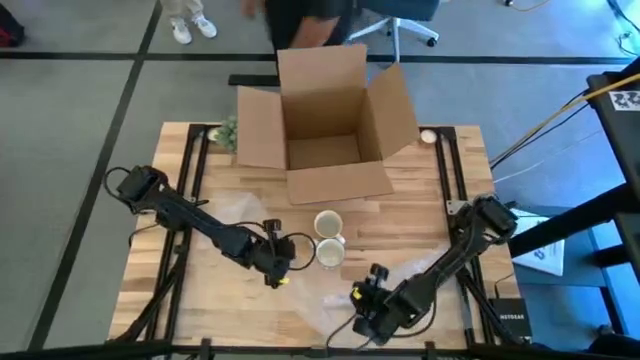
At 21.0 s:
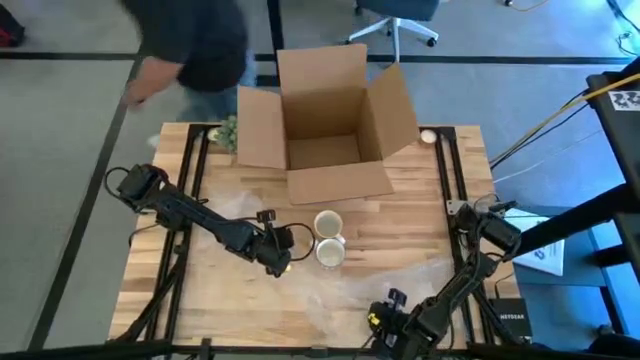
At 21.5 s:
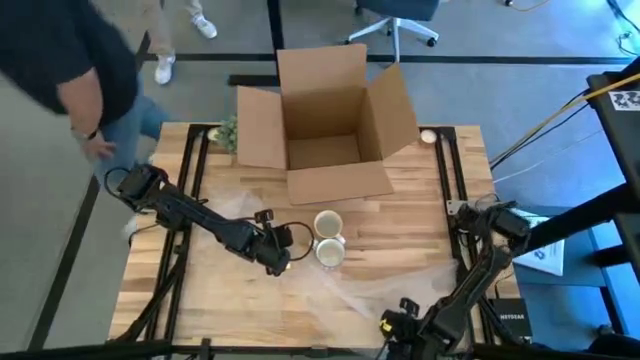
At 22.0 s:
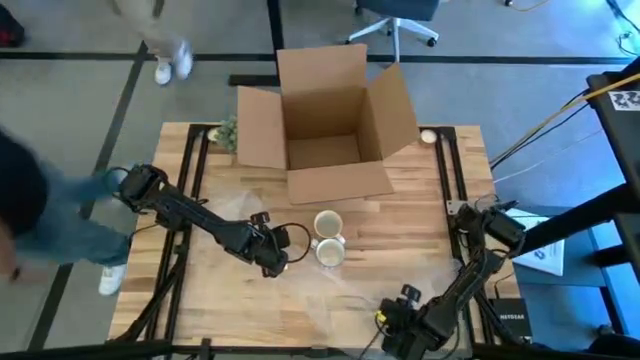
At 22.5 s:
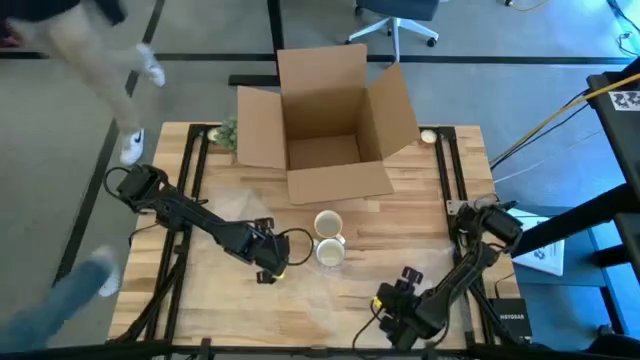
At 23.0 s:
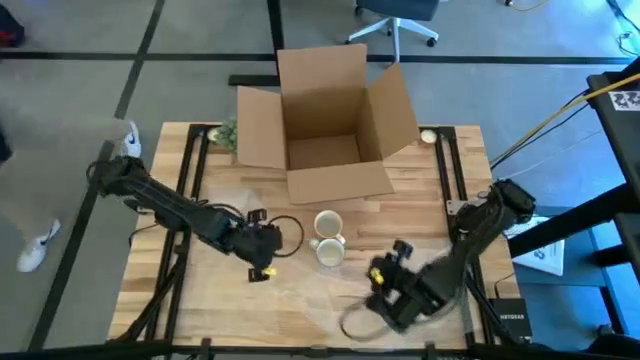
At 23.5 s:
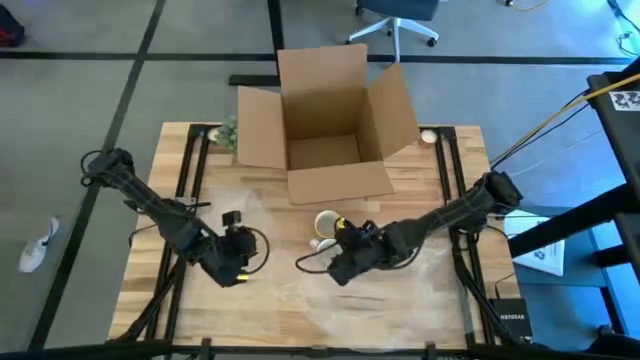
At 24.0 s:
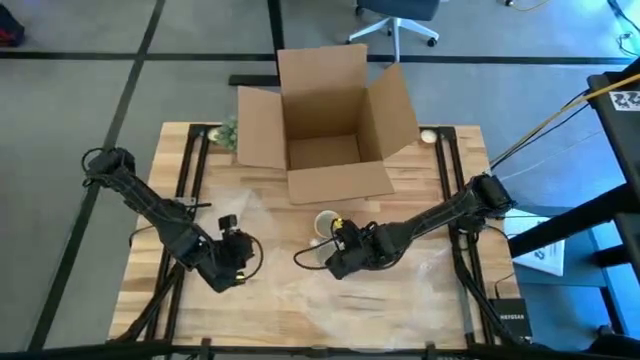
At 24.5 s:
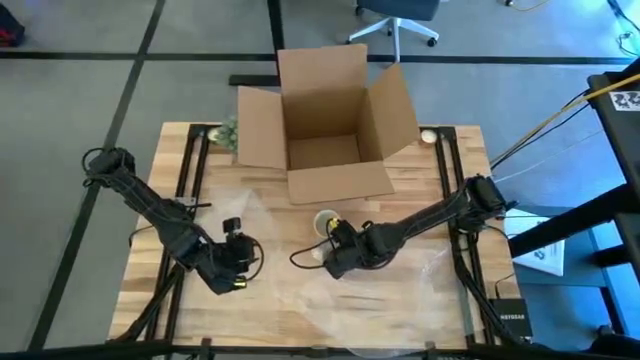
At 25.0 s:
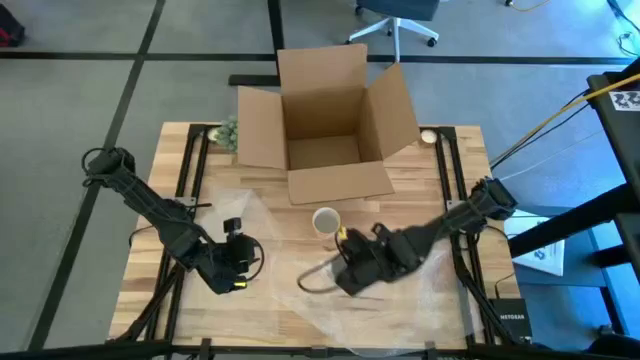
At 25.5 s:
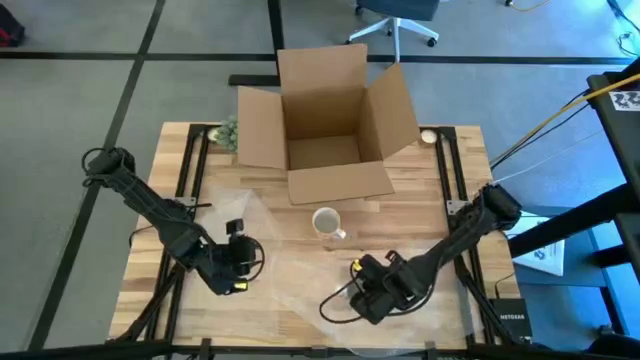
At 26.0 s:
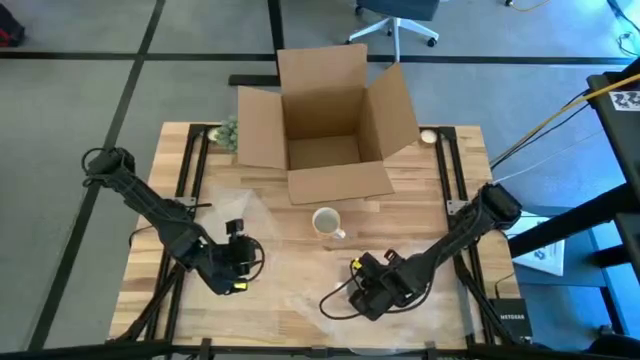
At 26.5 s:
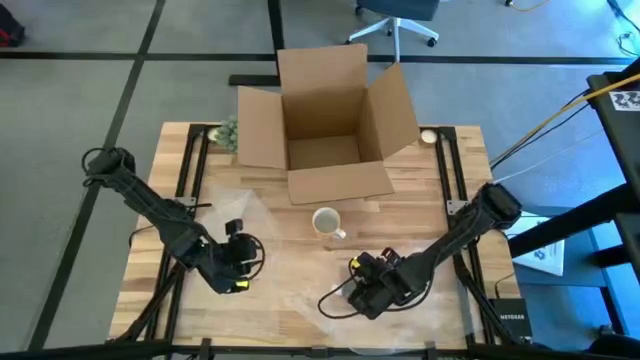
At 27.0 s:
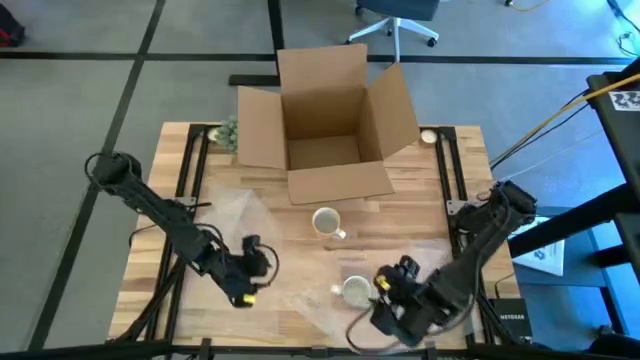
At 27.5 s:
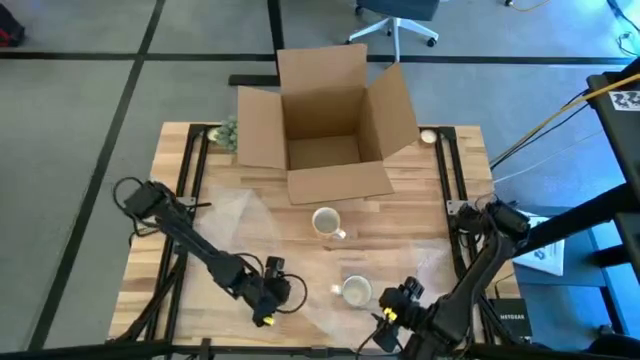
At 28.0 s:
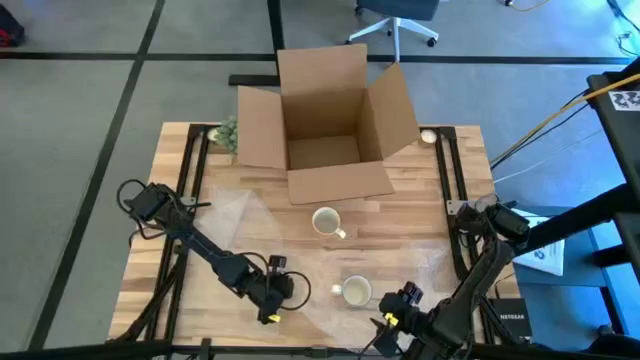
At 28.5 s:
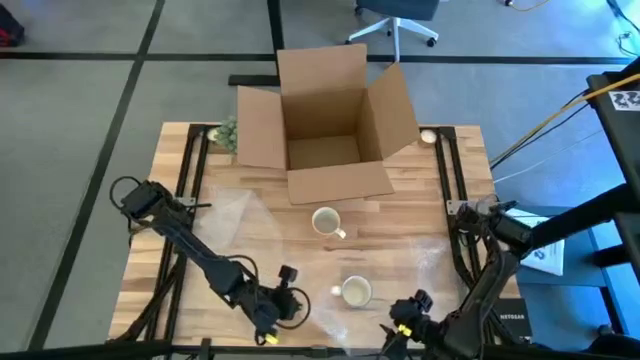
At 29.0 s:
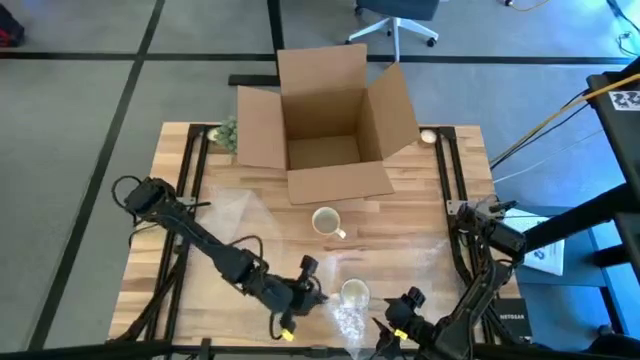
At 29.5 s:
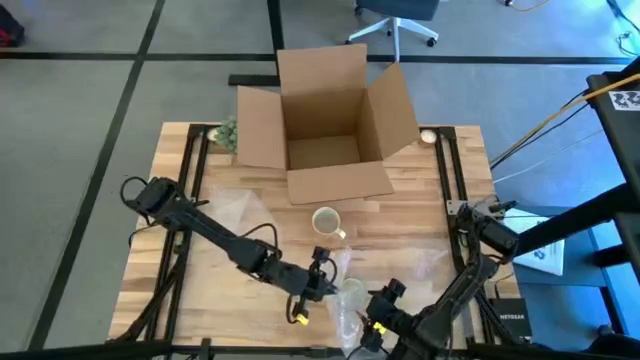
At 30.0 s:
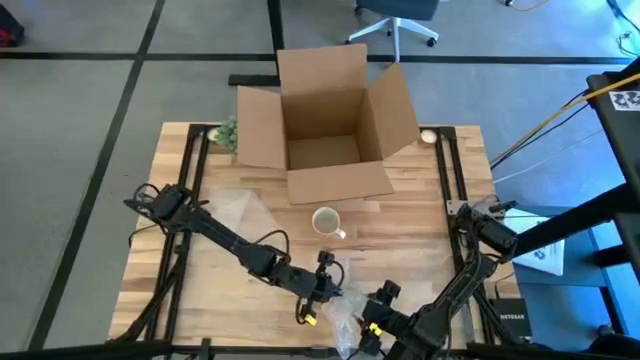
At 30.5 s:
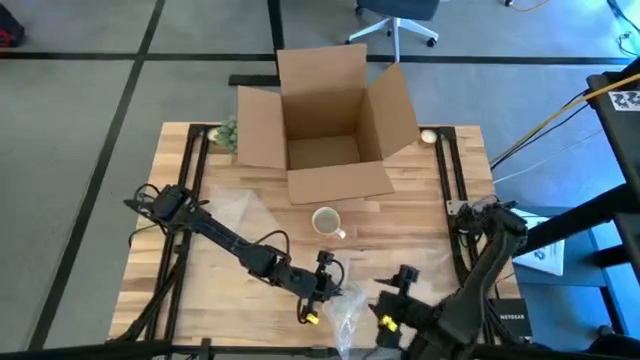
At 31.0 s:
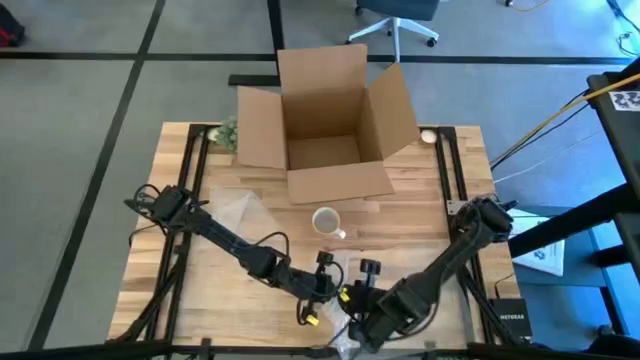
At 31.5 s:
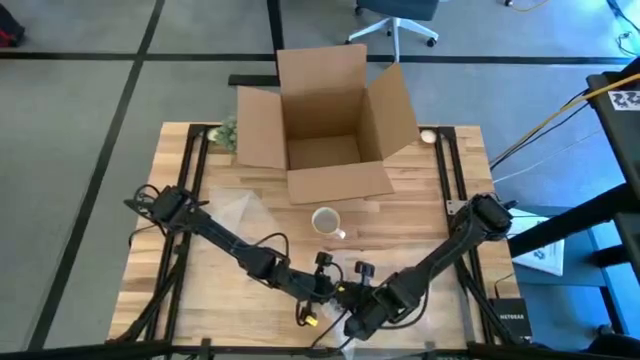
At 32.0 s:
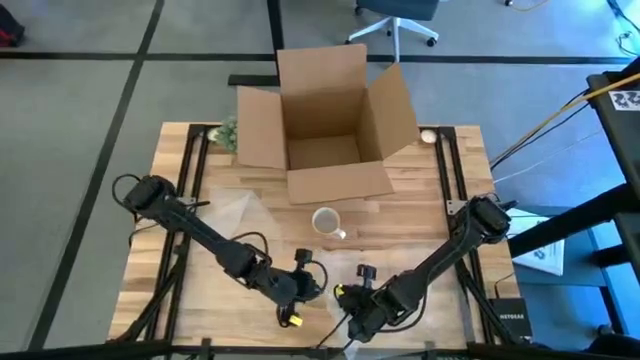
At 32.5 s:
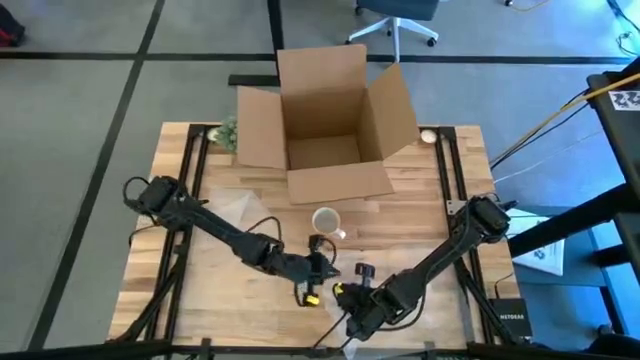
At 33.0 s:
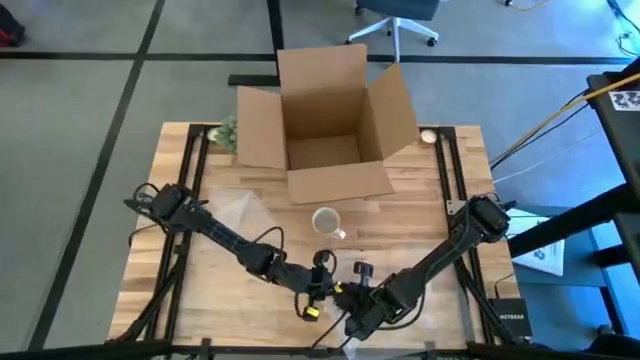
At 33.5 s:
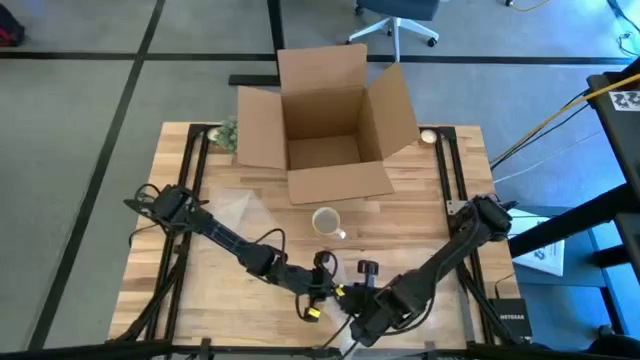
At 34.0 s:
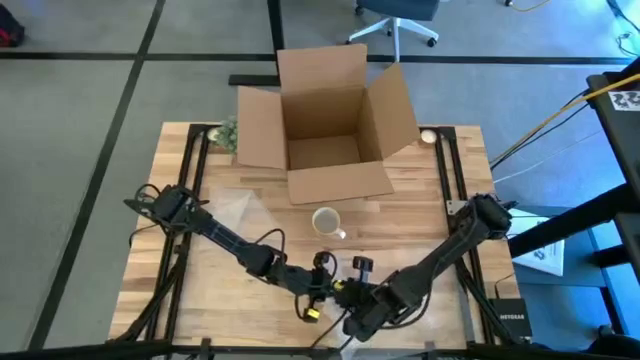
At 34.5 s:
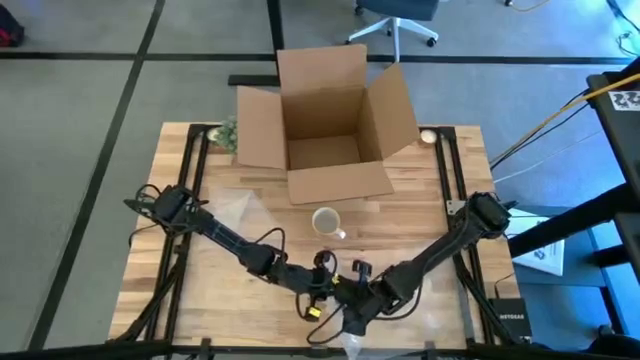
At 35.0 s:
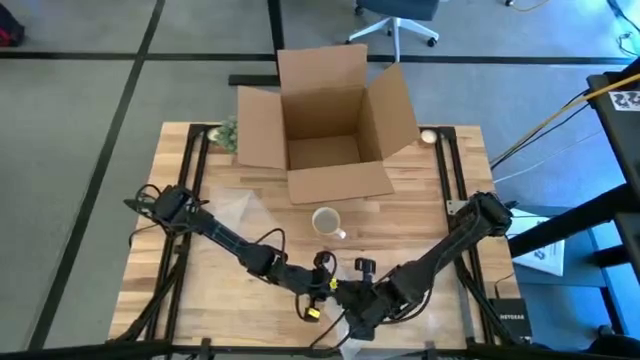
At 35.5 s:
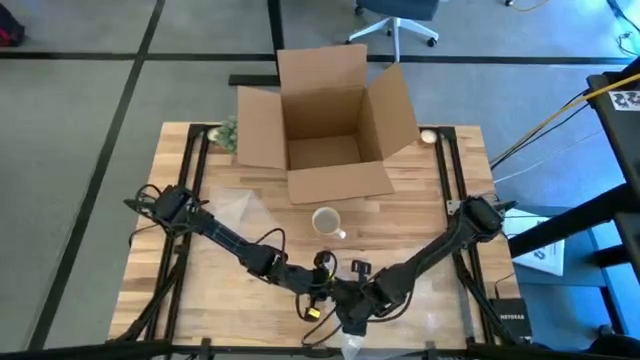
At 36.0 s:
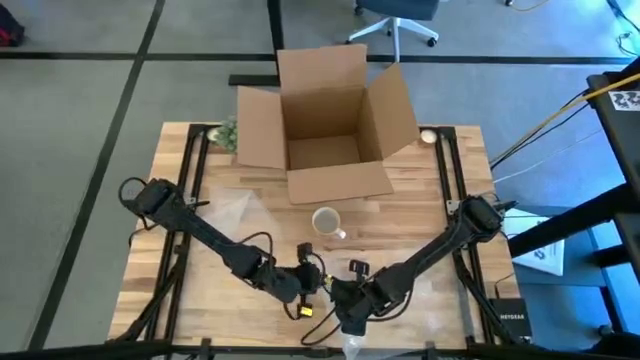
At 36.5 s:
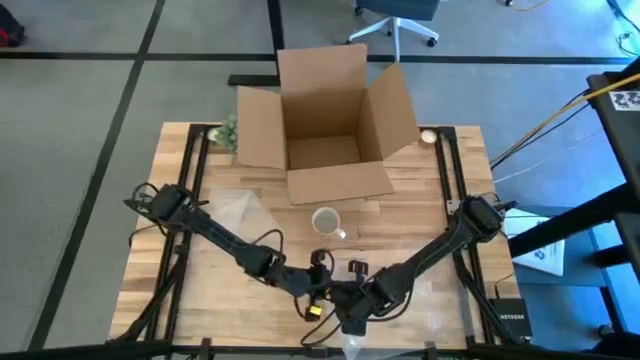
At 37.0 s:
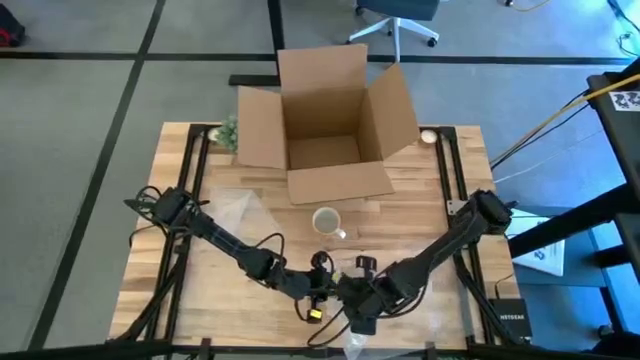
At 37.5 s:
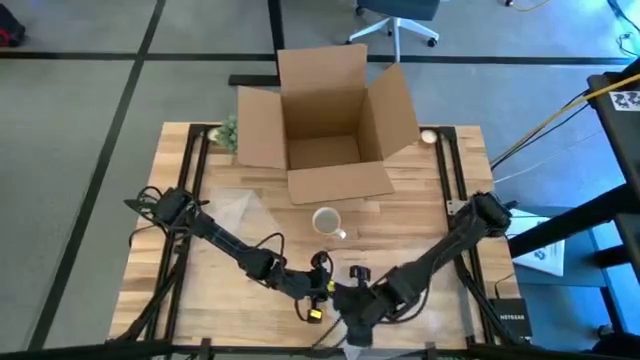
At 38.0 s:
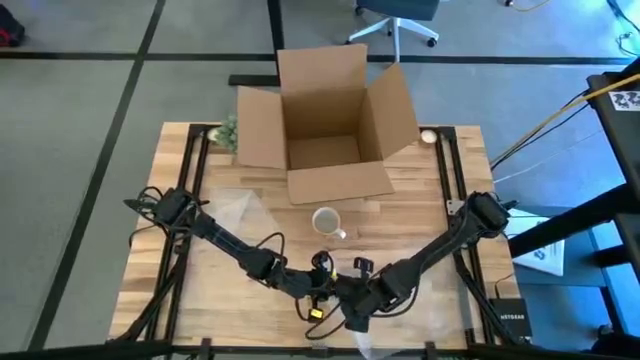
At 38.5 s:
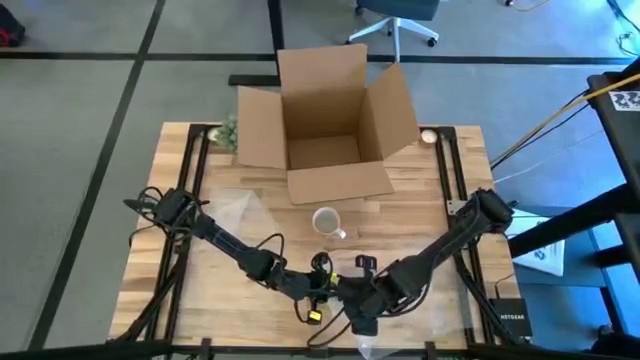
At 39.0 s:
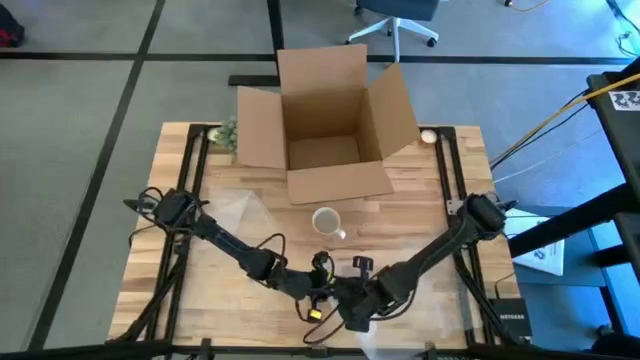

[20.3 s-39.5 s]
Task: wrap mug
Wrap the red mug with transparent bubble wrap
